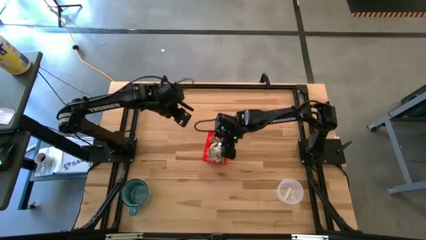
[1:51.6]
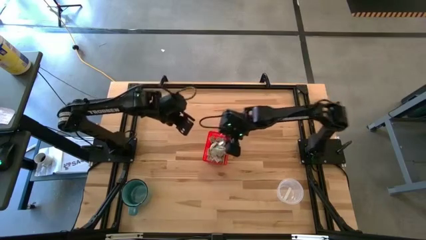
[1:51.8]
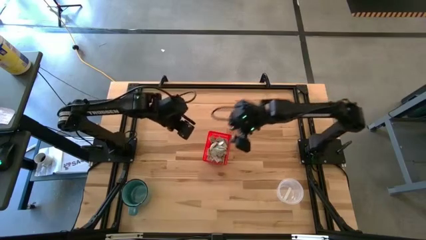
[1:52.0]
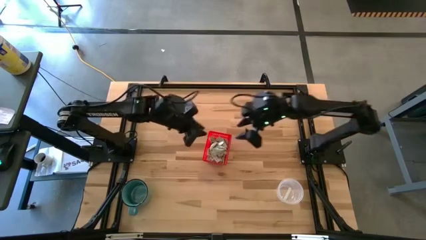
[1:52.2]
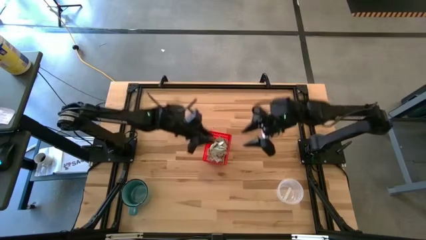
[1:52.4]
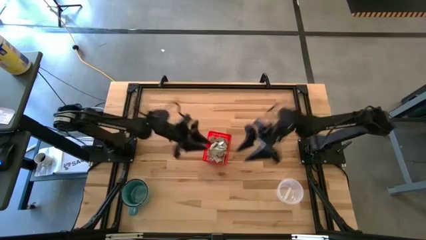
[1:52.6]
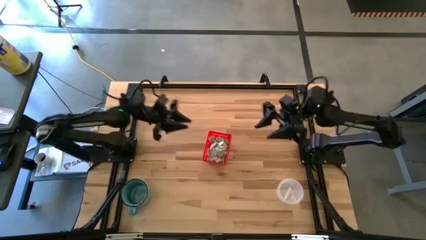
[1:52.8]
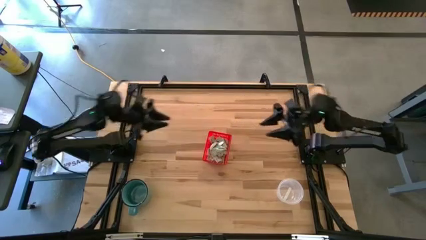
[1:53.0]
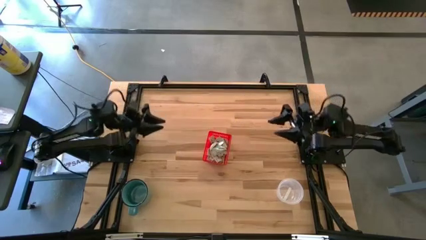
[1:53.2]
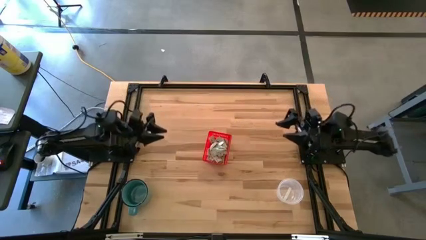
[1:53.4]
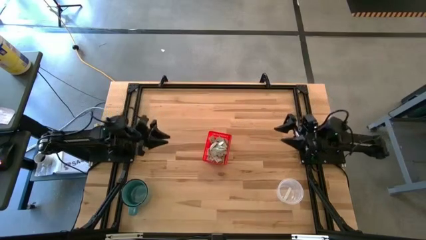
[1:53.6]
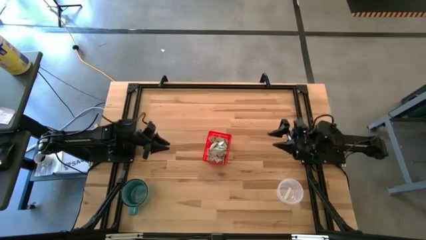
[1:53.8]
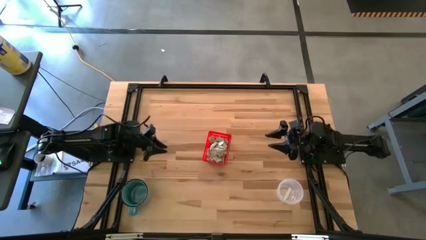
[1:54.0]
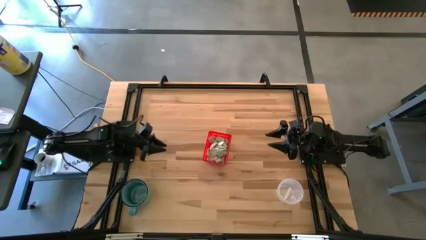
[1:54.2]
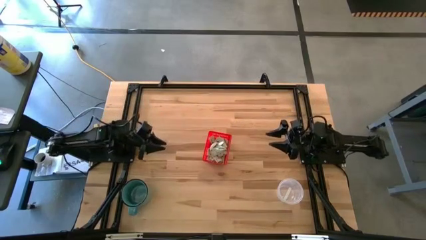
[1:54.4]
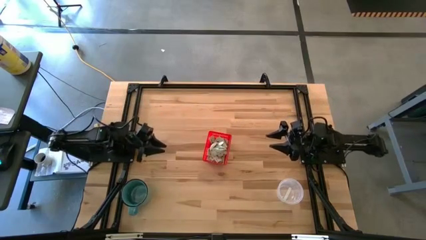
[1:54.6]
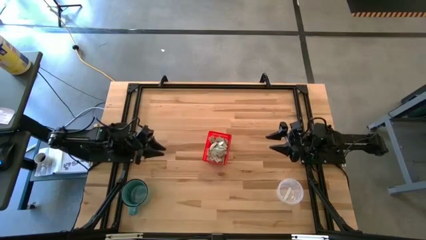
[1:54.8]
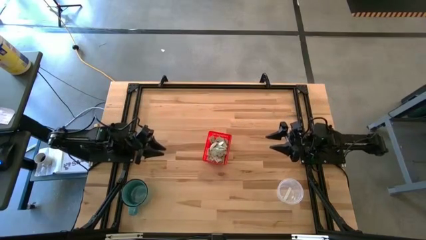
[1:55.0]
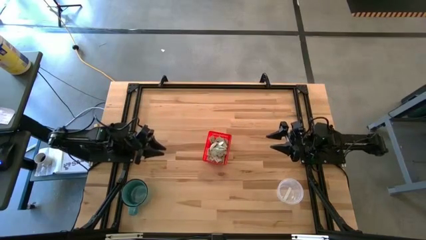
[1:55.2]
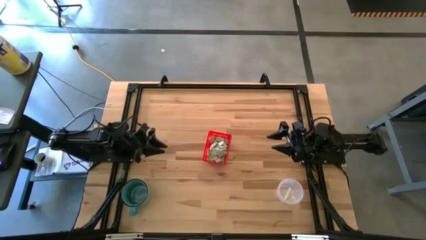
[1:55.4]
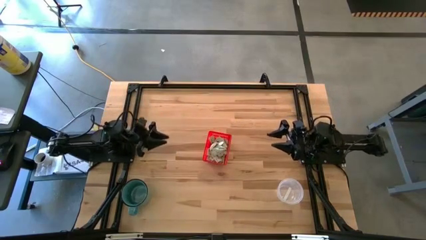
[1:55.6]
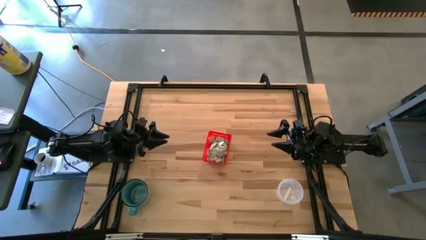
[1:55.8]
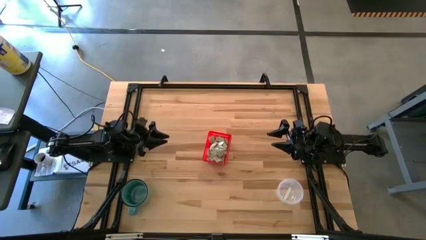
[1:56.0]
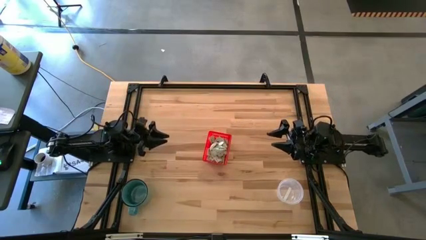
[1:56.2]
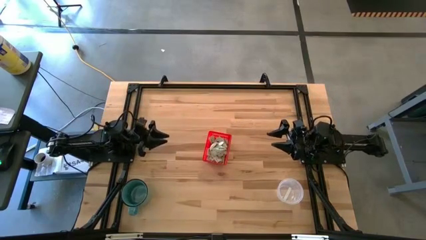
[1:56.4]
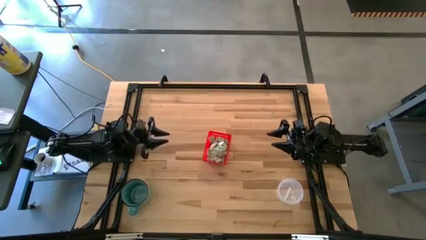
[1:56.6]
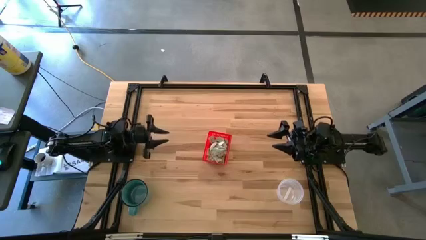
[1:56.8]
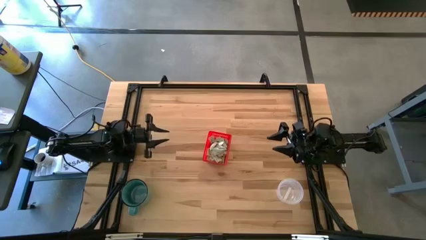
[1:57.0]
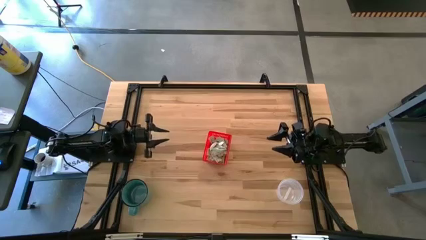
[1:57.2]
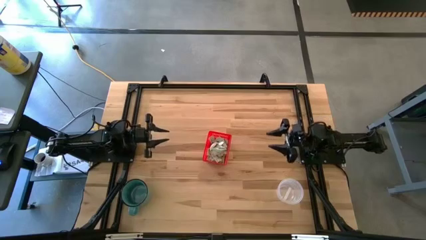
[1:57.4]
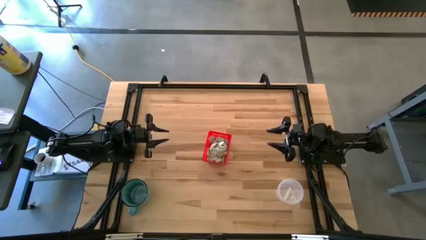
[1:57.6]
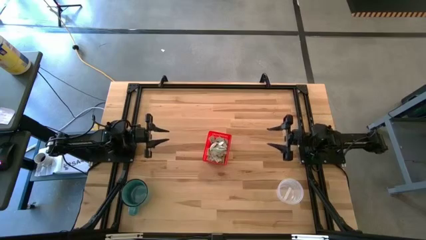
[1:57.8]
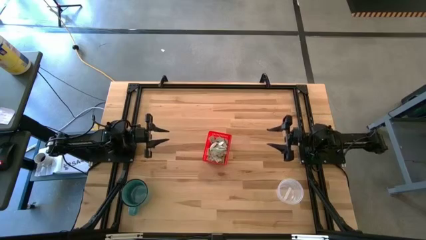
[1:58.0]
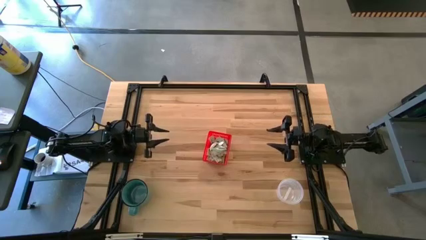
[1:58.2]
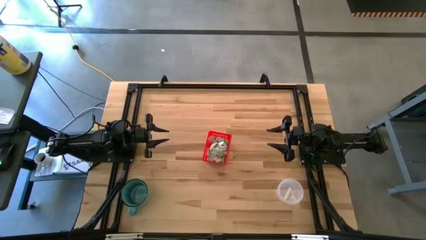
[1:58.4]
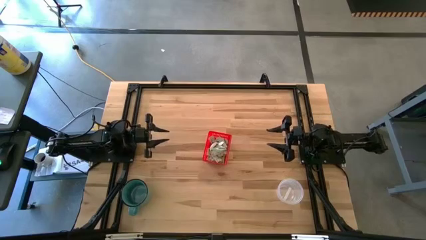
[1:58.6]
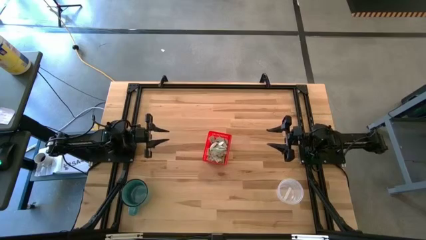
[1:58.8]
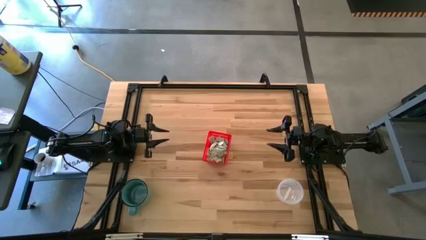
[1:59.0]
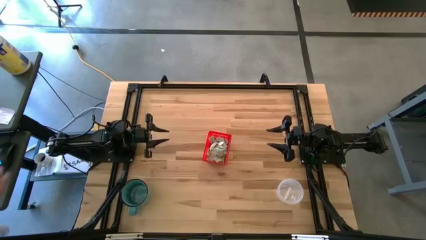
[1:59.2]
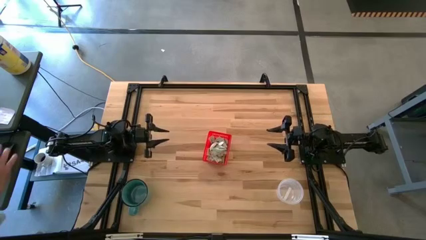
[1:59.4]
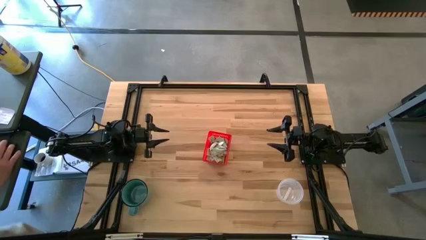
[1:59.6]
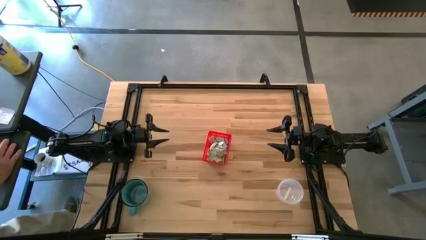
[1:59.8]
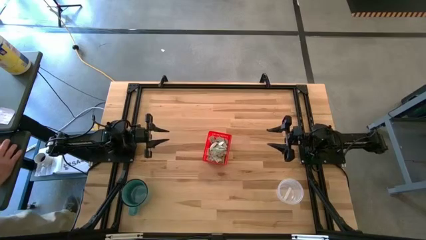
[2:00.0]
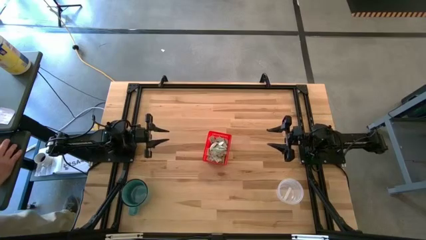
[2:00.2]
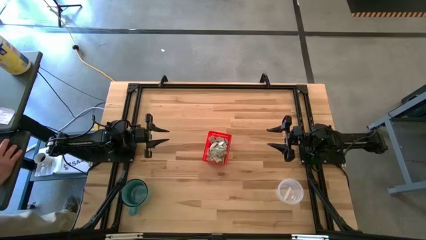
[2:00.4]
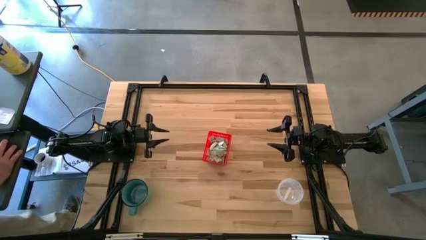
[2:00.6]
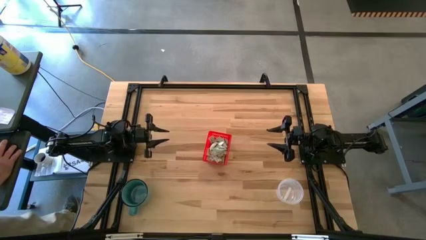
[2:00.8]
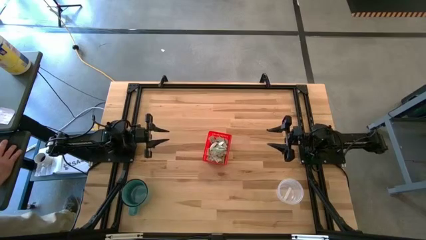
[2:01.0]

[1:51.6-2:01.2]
Task: Pick and place items into bin
Return to Home Position

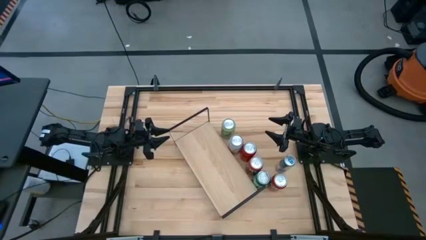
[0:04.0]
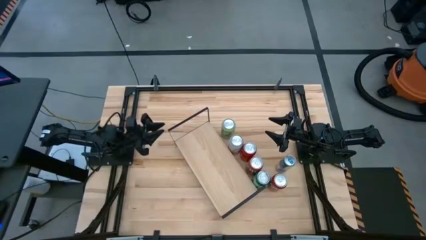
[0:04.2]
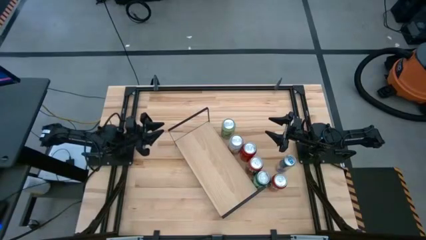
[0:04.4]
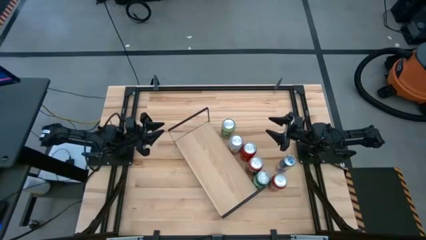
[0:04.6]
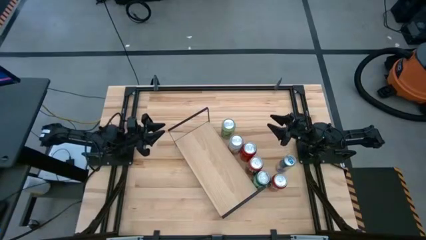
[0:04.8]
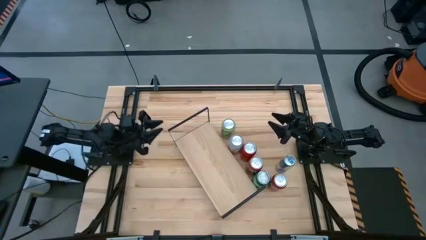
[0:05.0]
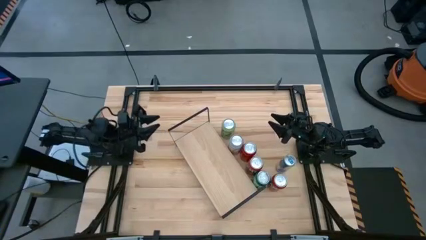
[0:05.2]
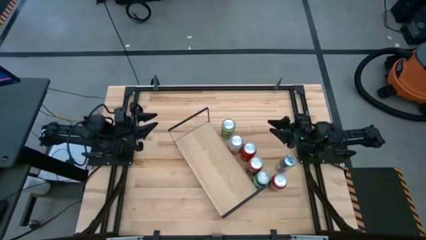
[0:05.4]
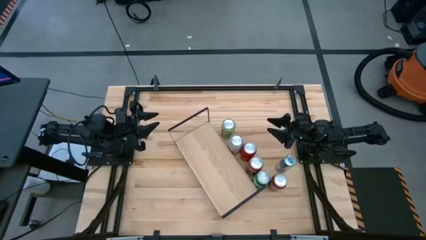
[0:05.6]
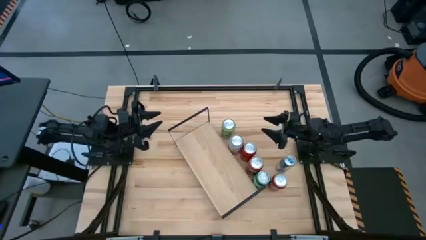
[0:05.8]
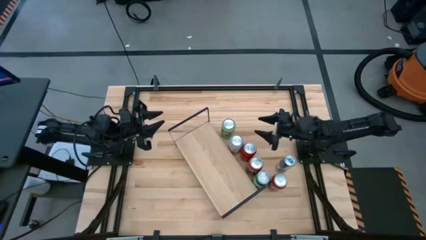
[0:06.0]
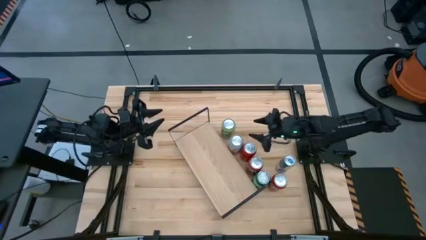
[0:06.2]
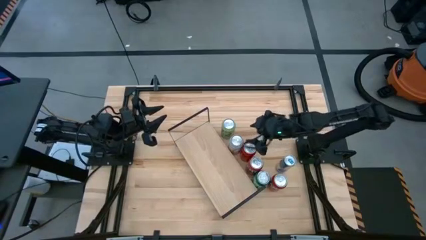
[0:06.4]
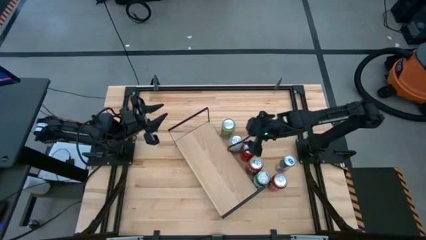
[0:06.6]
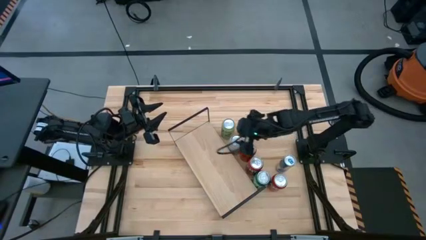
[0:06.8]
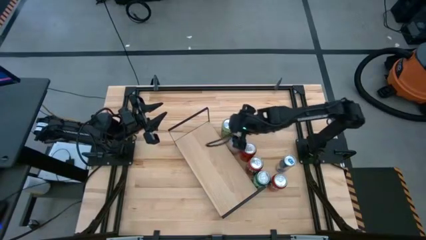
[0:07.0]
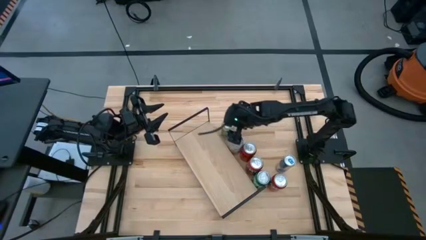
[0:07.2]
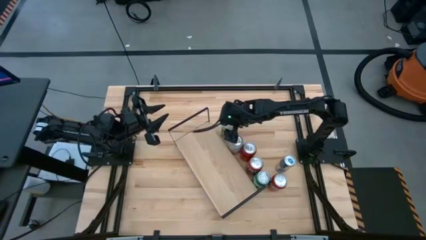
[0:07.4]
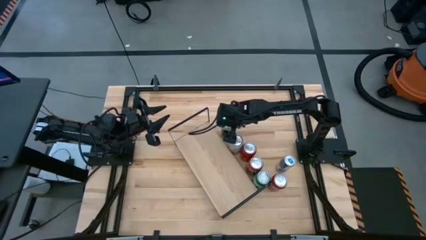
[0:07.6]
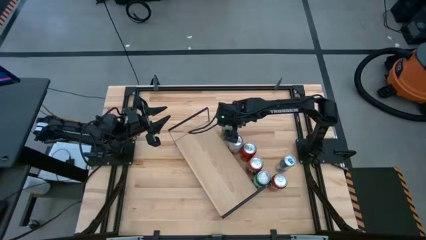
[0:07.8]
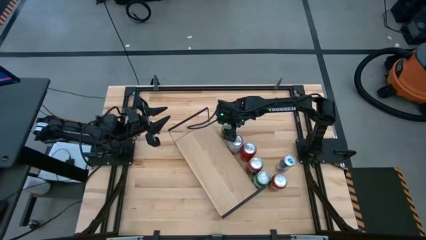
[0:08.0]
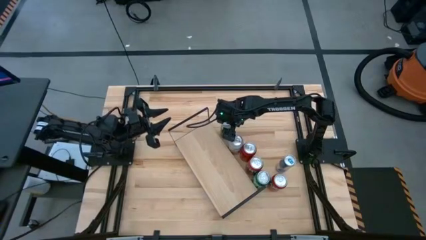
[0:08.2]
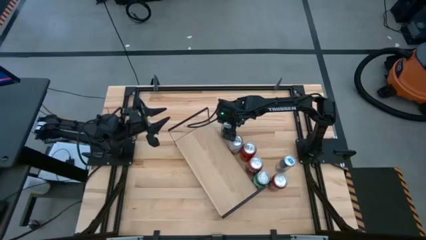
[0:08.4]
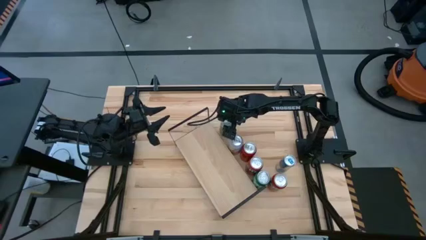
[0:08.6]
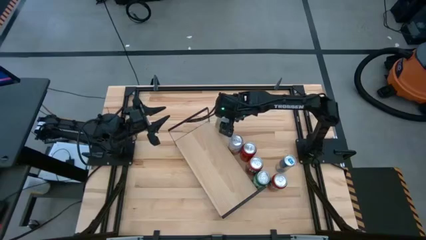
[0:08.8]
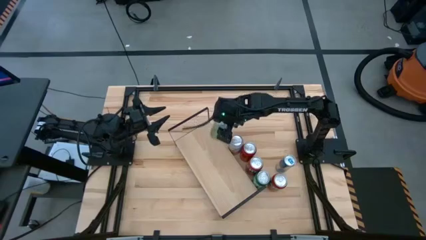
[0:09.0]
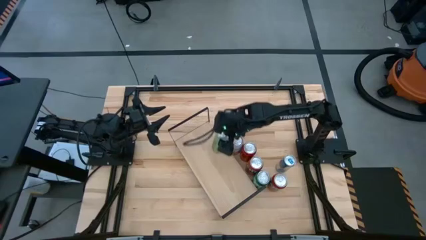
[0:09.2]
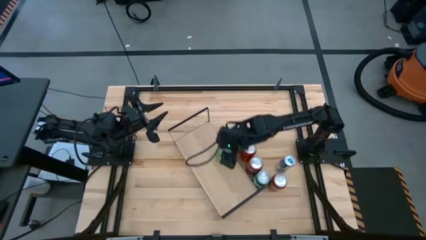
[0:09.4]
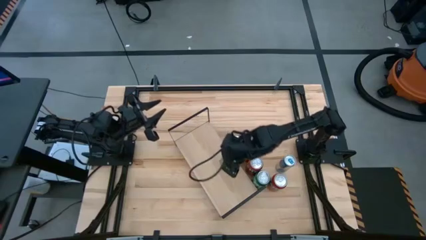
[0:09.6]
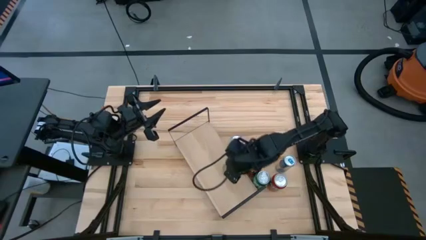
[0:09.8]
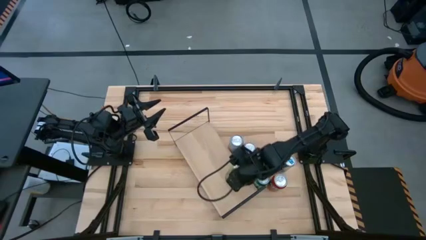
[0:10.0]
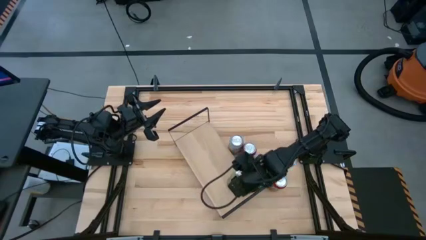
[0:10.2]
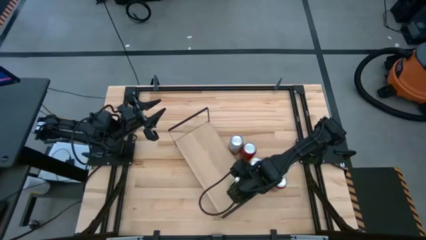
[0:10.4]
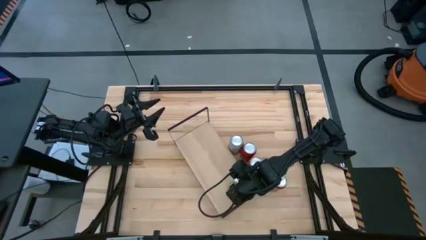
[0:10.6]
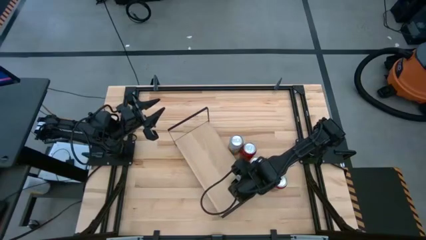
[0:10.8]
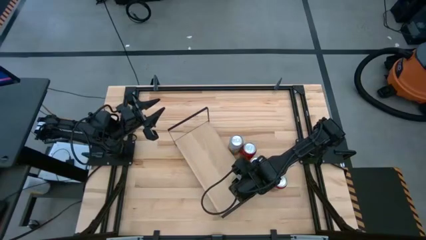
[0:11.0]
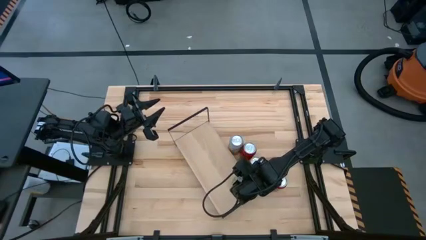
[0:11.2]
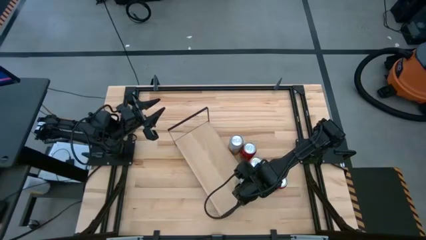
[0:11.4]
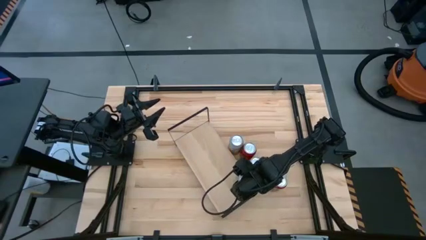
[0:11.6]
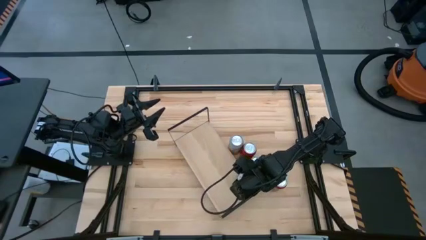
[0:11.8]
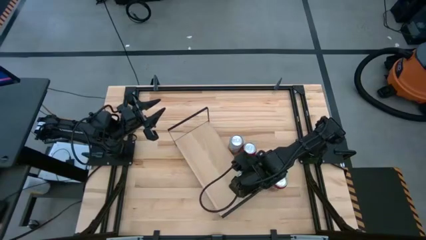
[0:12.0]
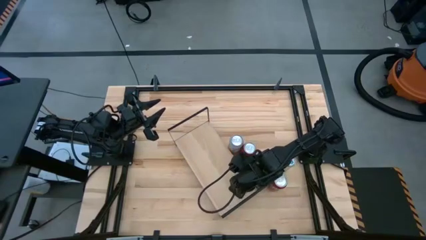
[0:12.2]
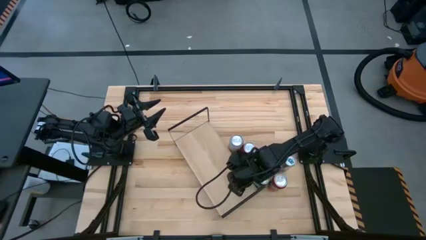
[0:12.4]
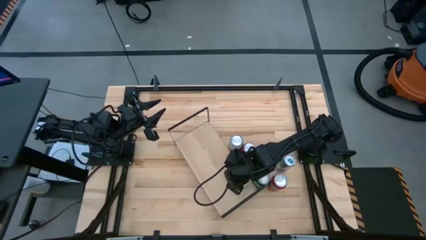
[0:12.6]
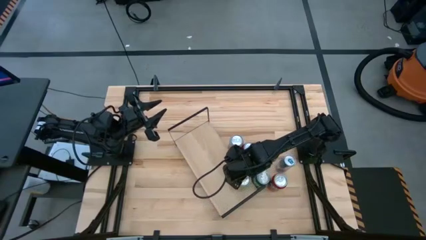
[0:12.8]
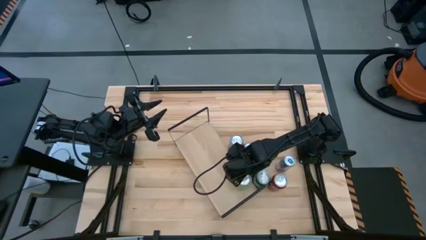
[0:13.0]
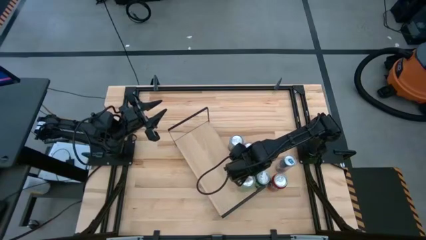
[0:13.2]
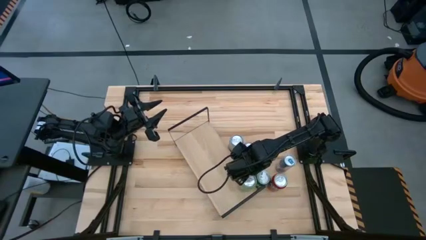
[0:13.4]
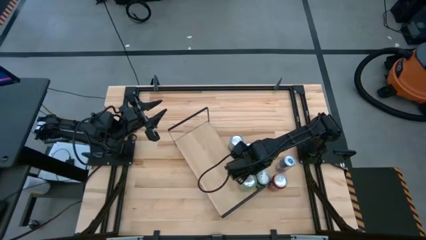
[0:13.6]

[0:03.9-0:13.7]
Task: Place canned beverage on shelf
Put the light green soda can on the shelf
